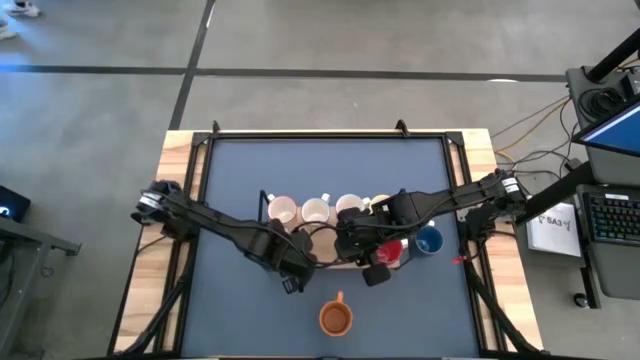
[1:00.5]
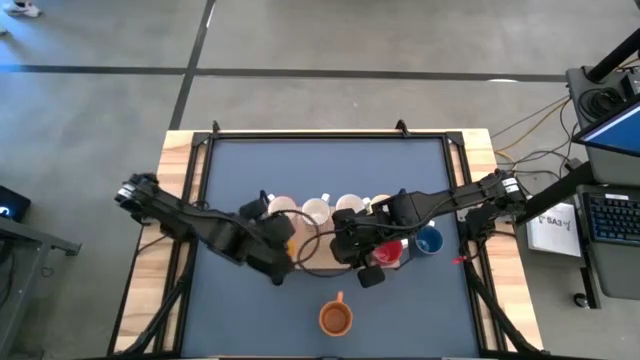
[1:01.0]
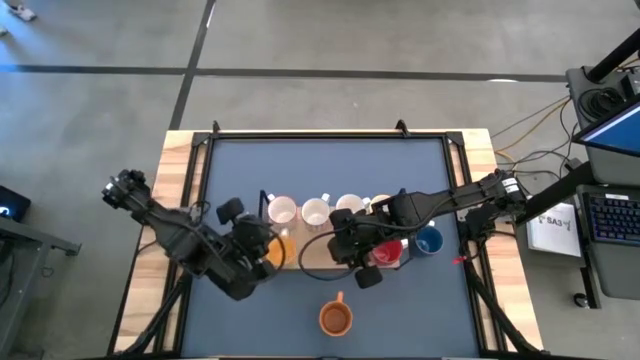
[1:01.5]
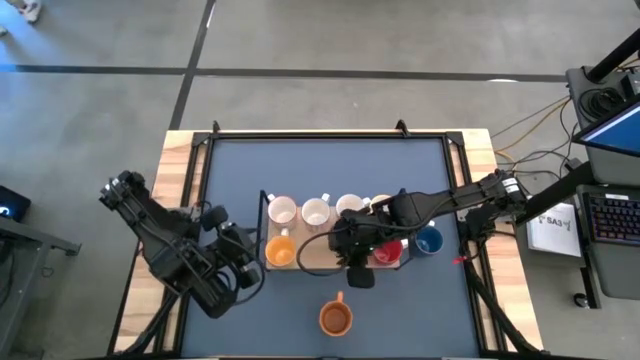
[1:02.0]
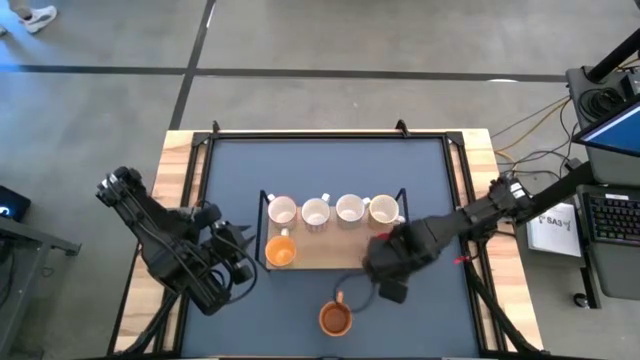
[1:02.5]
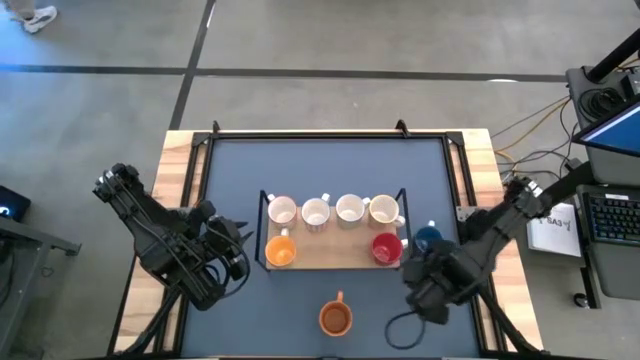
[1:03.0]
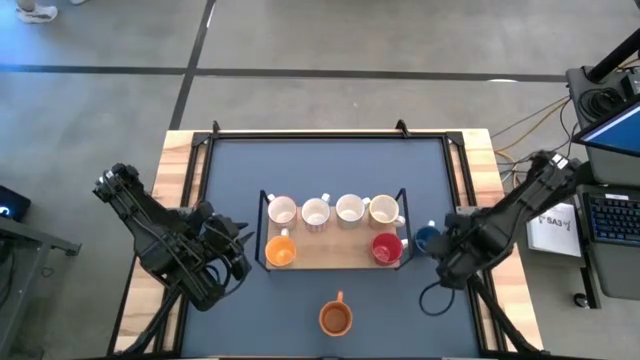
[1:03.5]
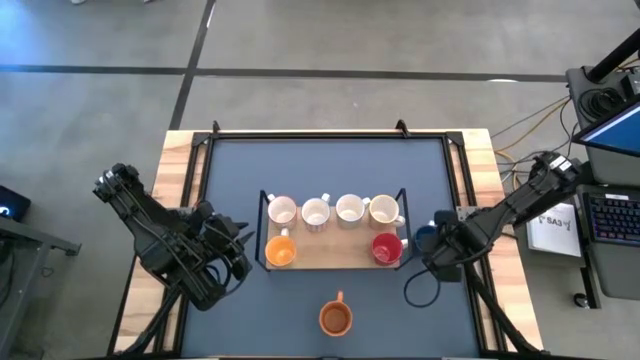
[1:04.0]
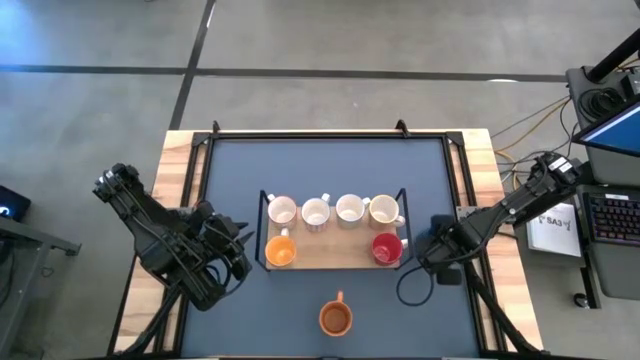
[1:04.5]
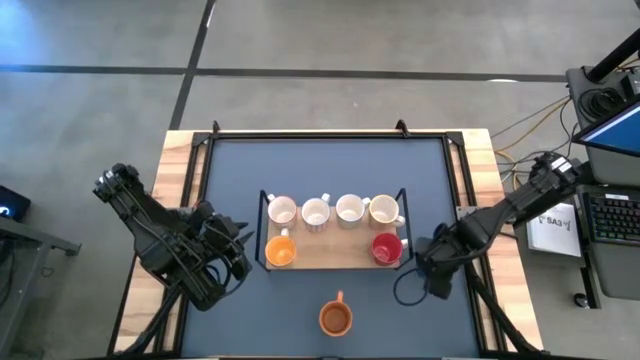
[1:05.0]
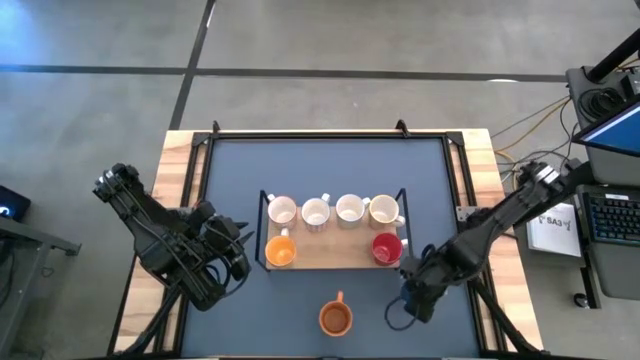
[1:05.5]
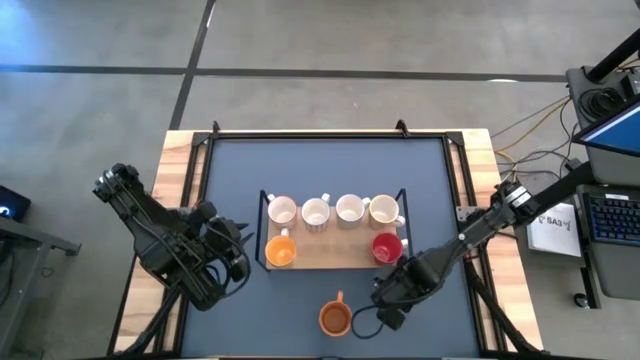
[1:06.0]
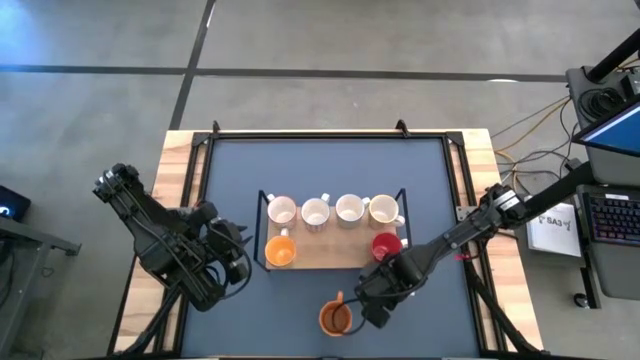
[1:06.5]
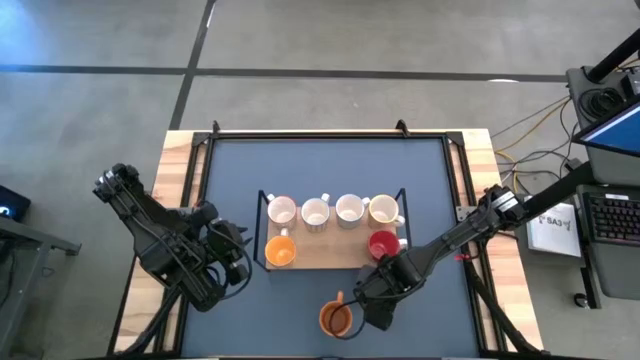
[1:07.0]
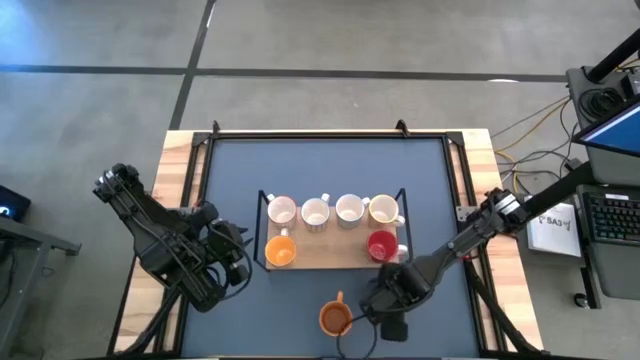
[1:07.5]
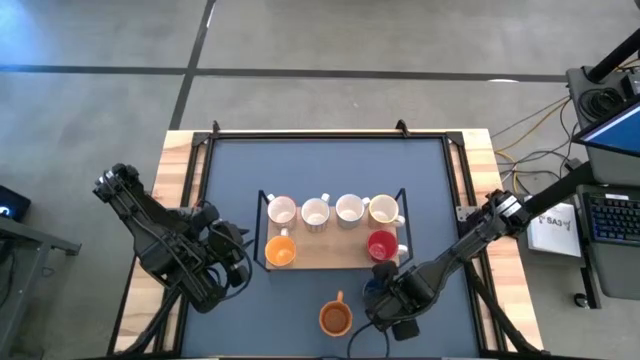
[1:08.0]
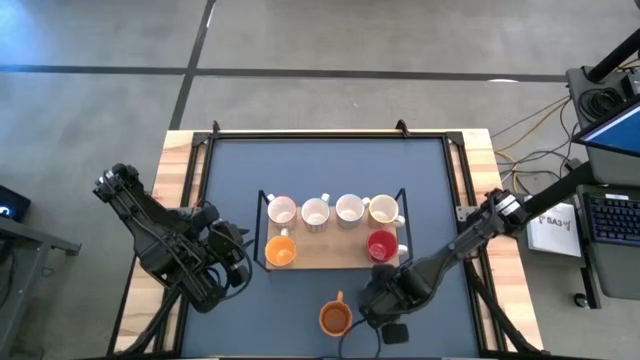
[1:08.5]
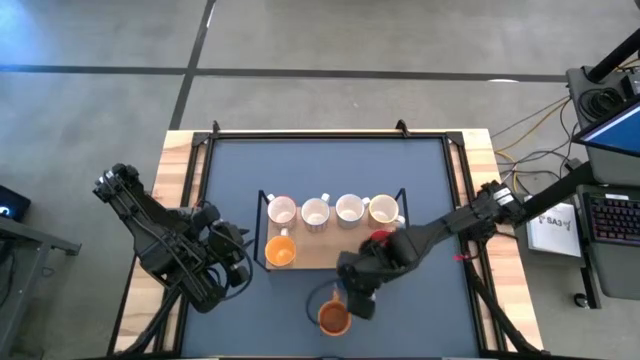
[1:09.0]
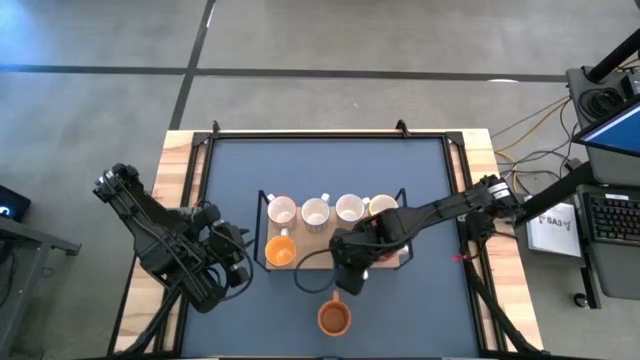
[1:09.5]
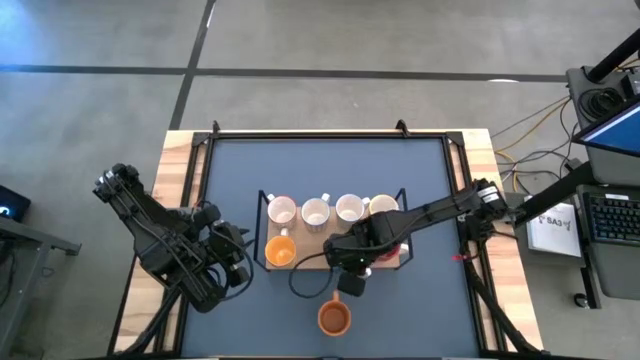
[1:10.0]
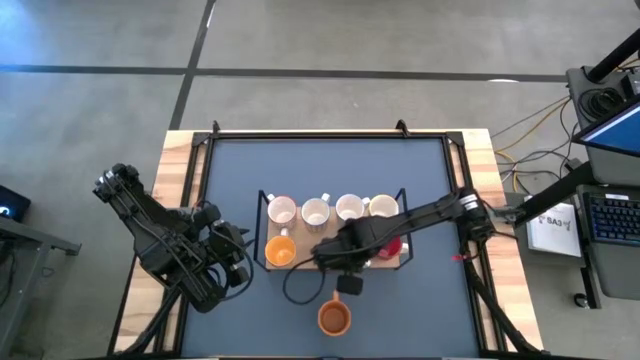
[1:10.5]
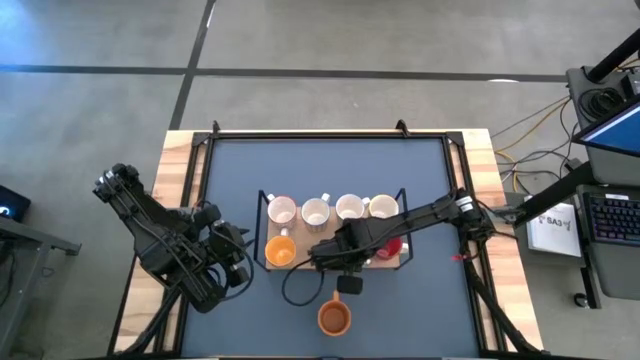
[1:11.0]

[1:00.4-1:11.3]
Task: Place coffee mugs
Put the blue mug on the shelf

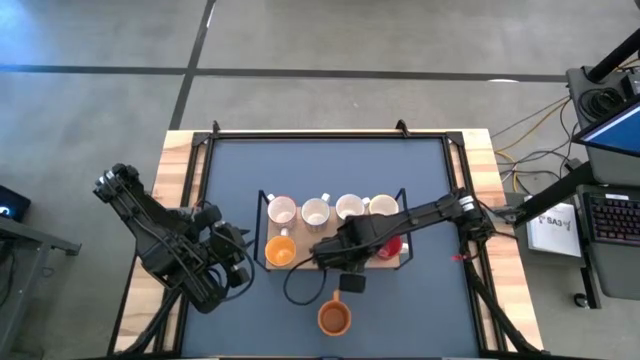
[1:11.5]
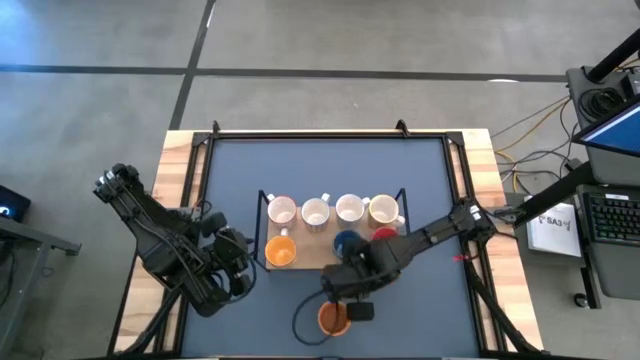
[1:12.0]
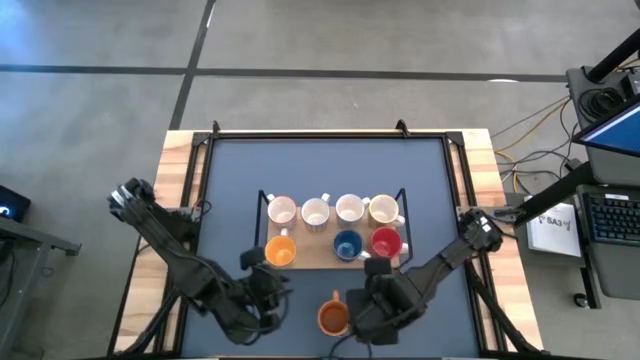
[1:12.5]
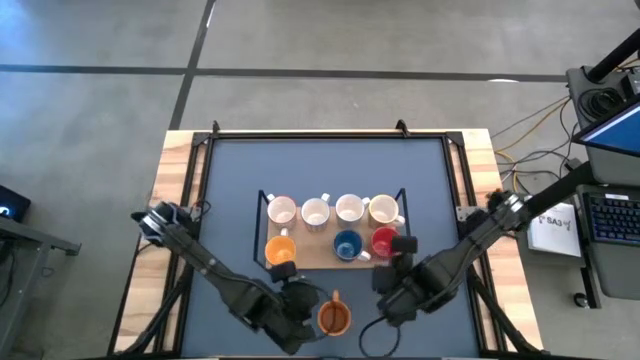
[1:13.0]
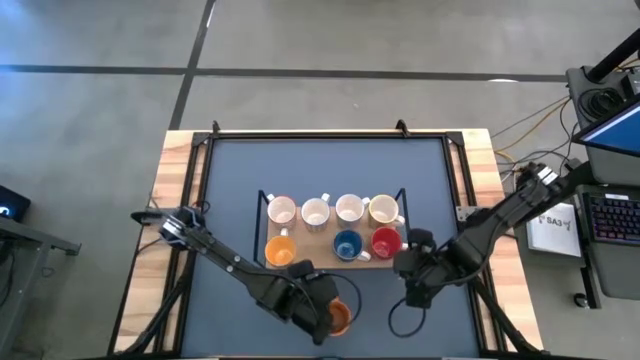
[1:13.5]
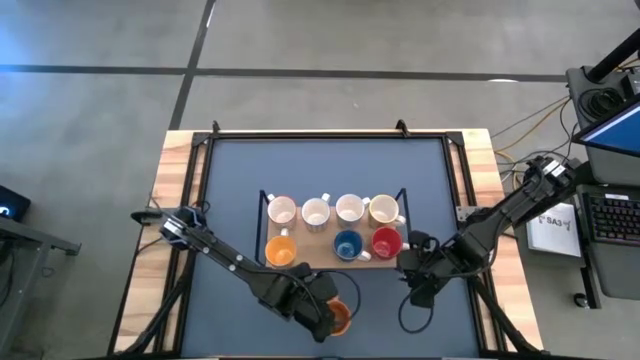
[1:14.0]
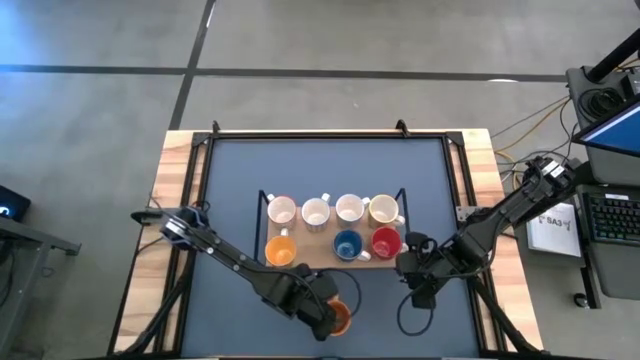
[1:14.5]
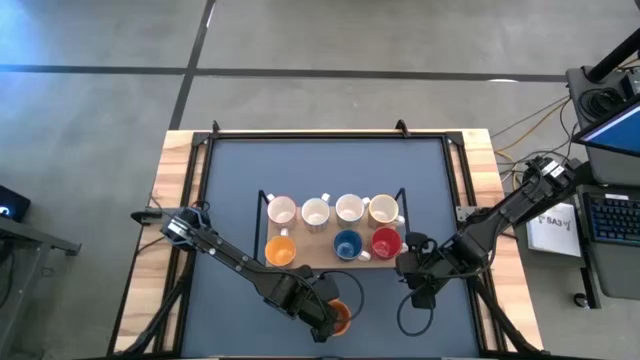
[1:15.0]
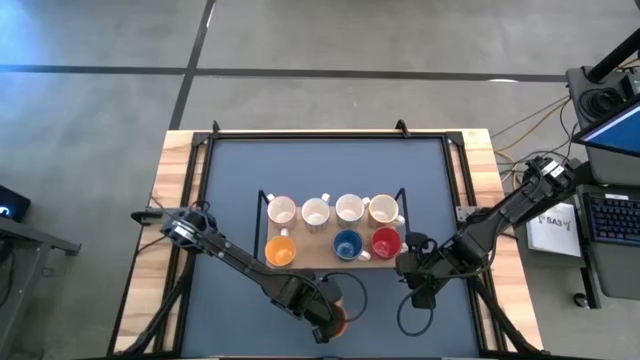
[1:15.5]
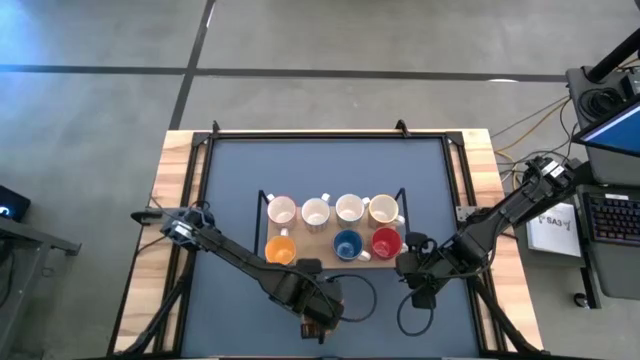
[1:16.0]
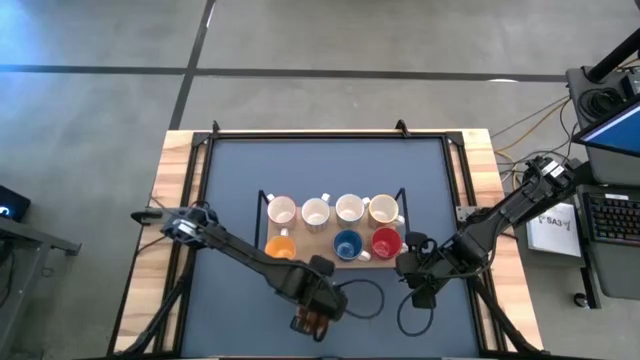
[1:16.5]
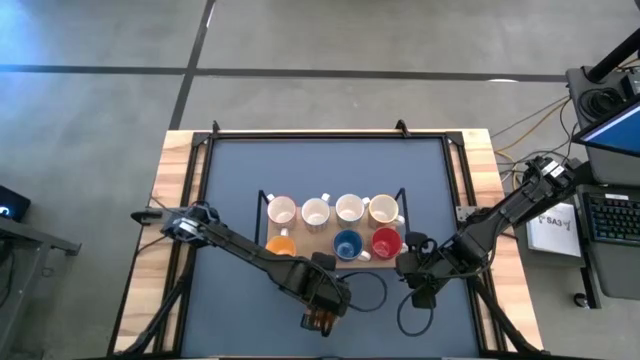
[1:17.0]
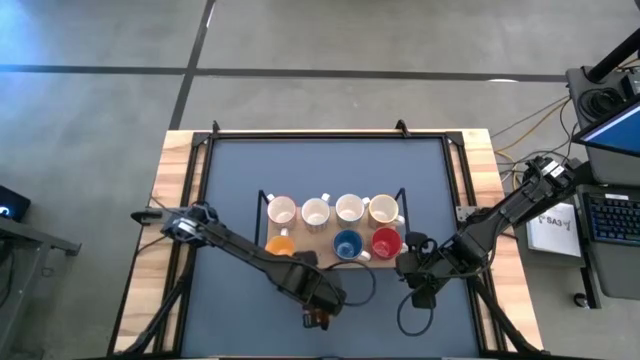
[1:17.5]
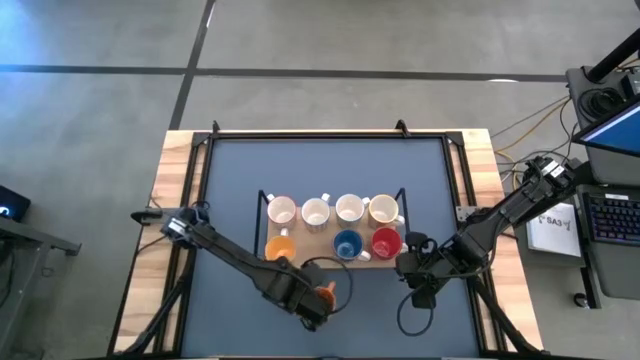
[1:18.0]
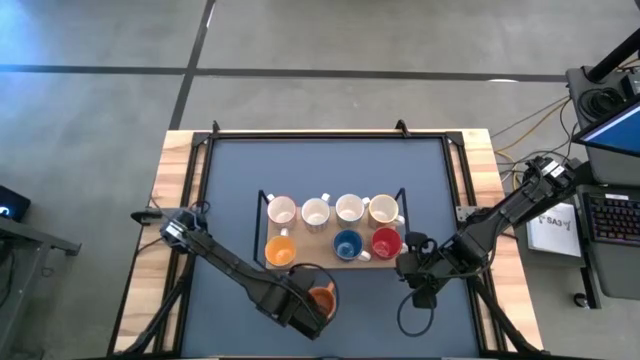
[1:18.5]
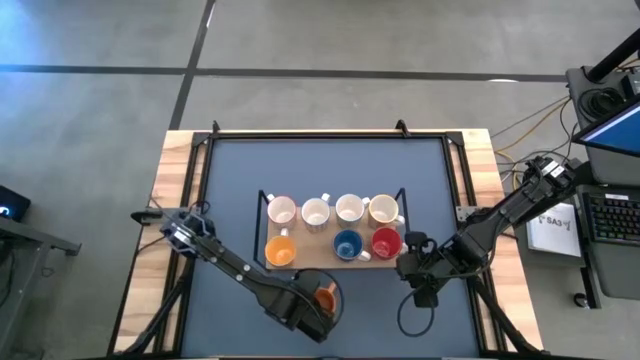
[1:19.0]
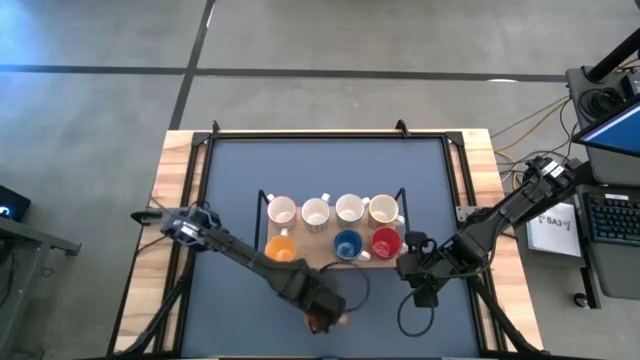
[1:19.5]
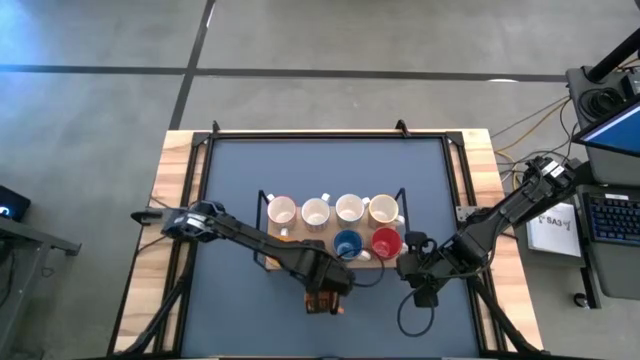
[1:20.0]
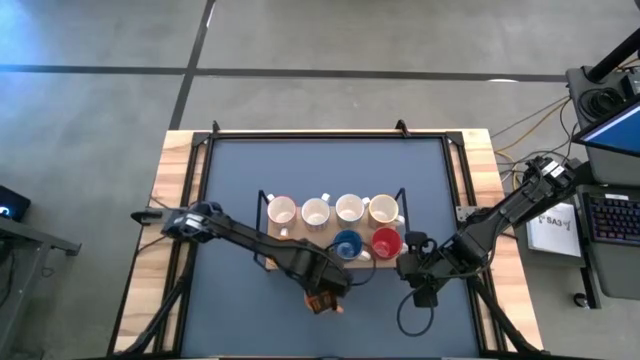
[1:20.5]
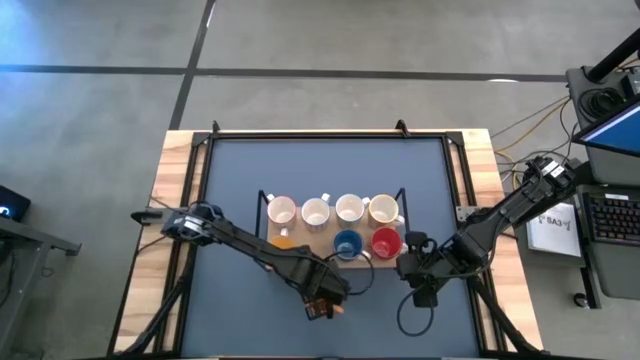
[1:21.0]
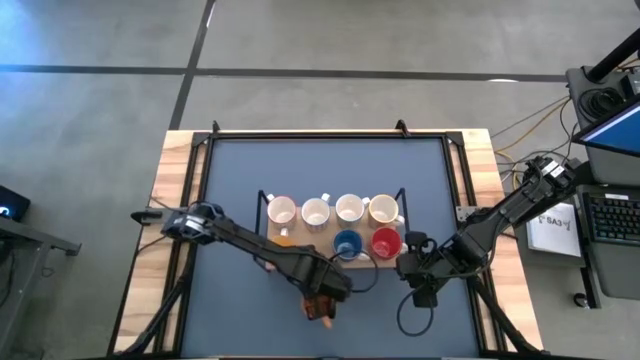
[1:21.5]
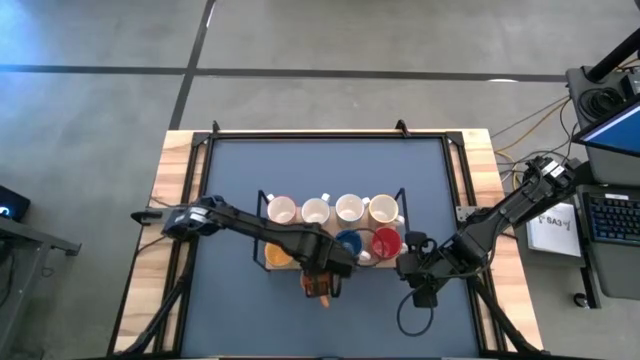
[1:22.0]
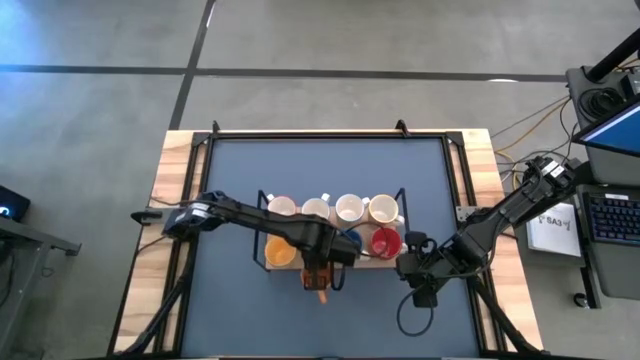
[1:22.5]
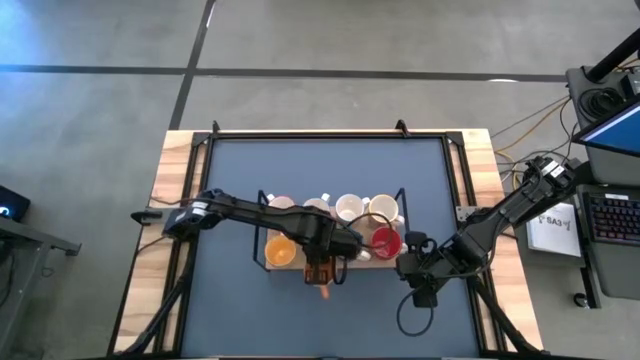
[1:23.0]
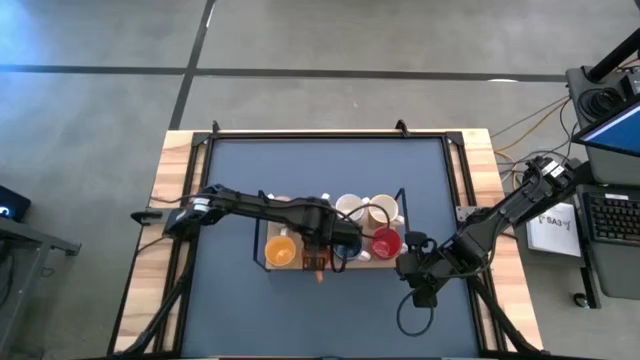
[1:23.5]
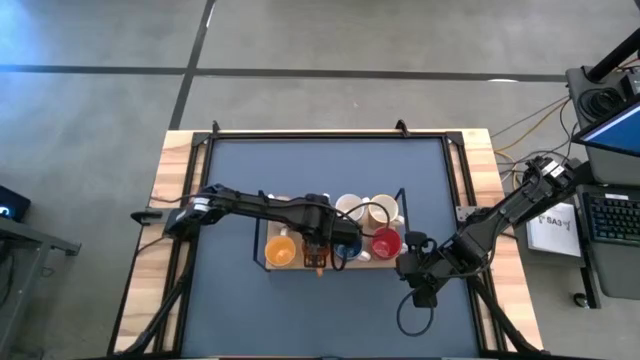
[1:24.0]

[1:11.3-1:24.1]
Put the orange mug on the shelf
